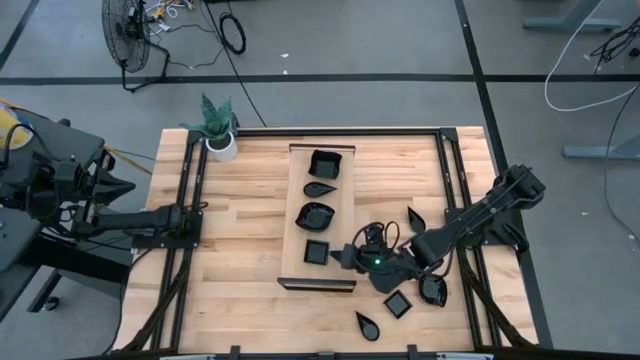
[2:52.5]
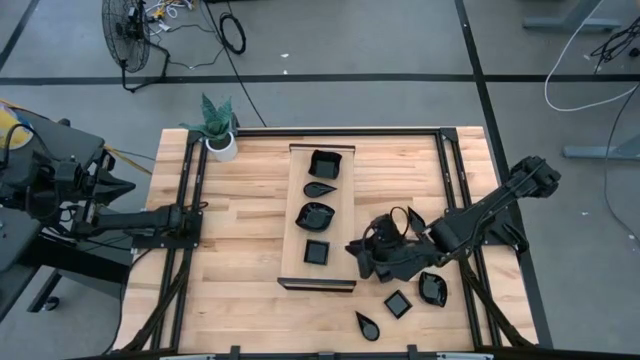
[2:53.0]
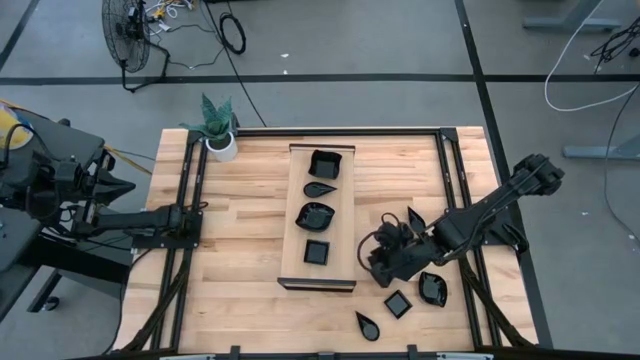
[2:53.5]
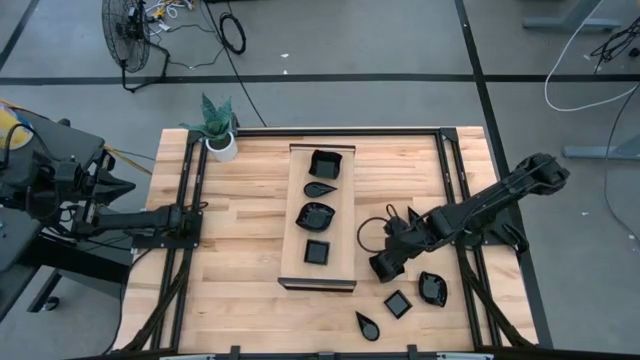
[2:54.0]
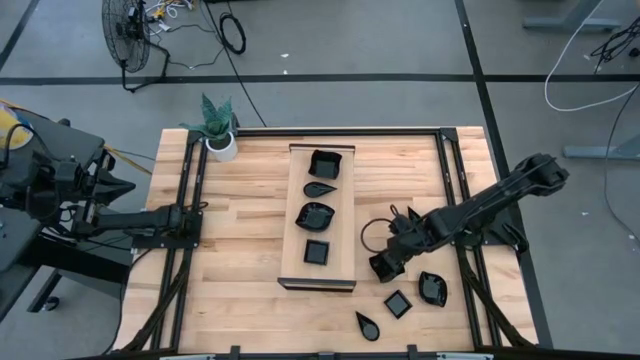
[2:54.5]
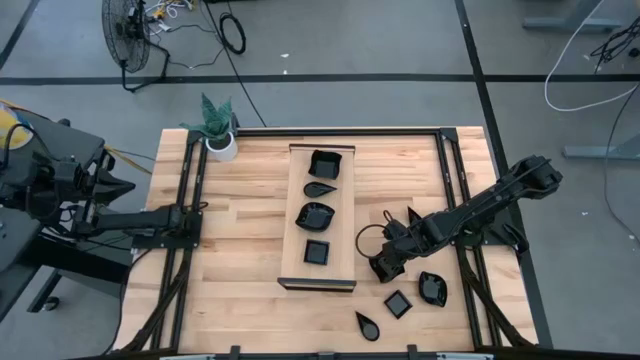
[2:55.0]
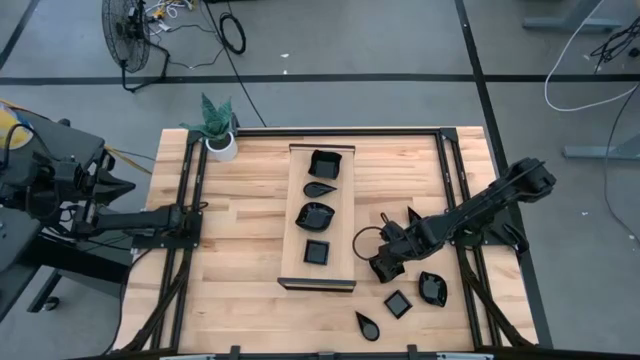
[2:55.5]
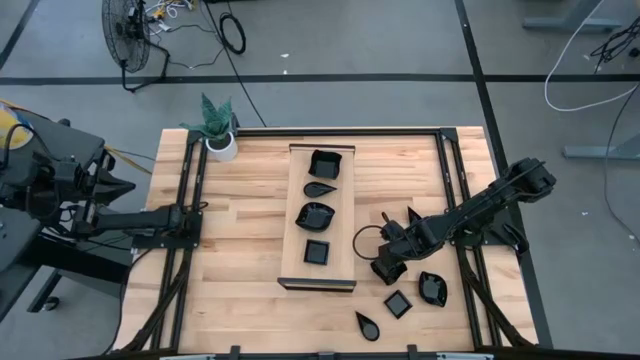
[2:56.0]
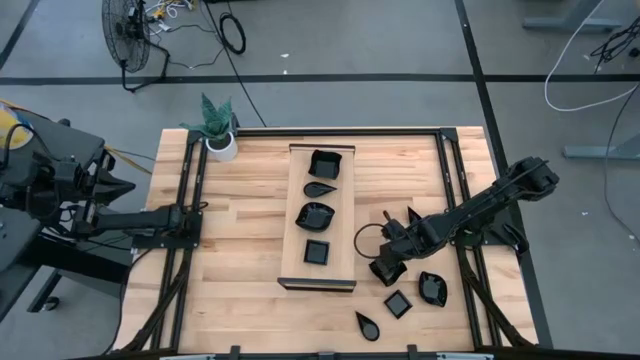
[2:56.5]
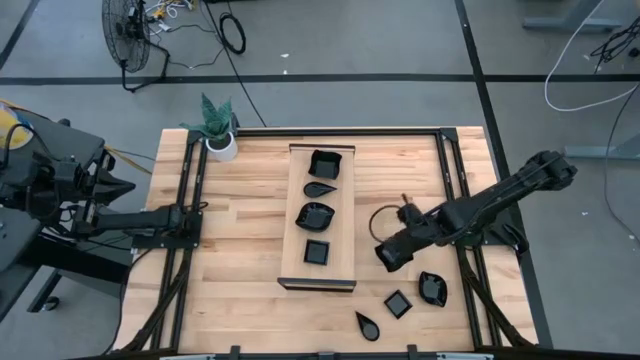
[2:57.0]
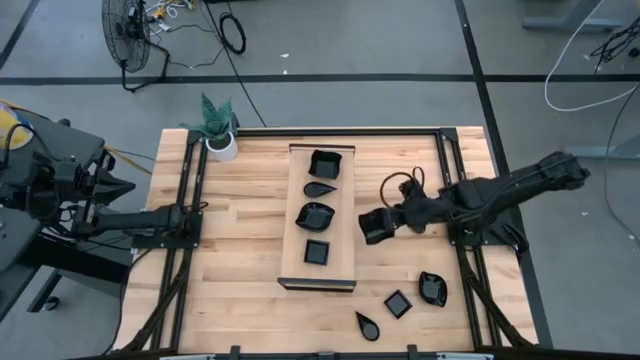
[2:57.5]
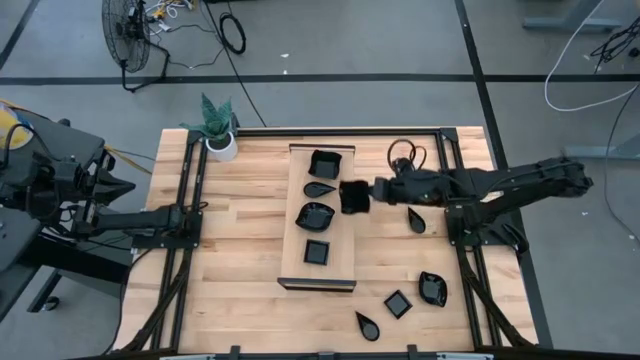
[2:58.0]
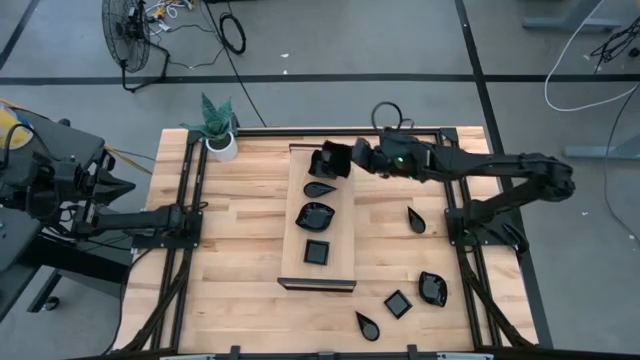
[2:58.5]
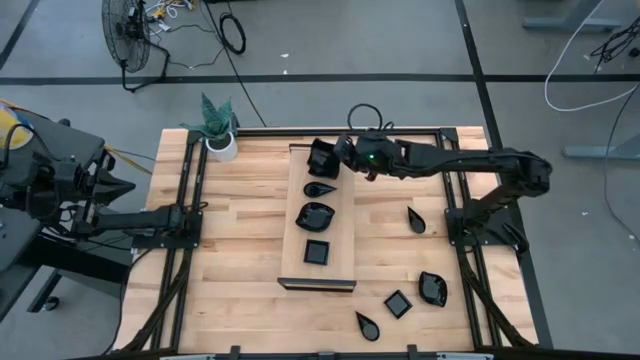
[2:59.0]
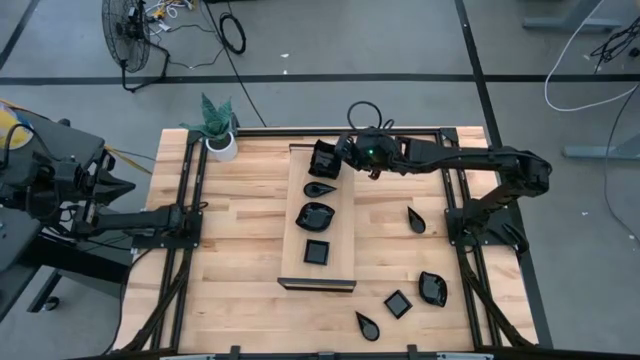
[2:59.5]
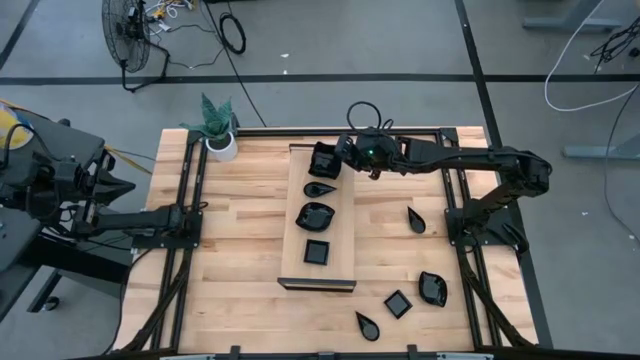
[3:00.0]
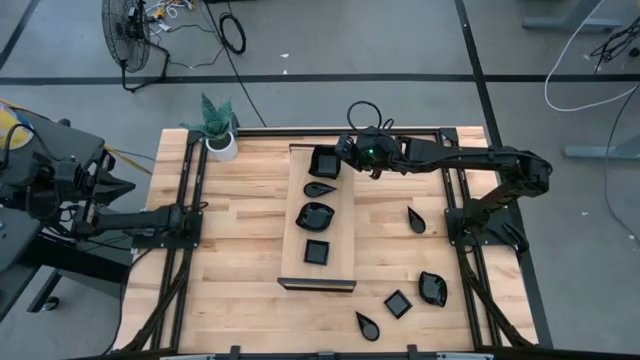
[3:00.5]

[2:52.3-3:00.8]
Task: Pick & Place Mini shaped plates
Stack the distorted square plate on top of the distorted square plate on the shelf

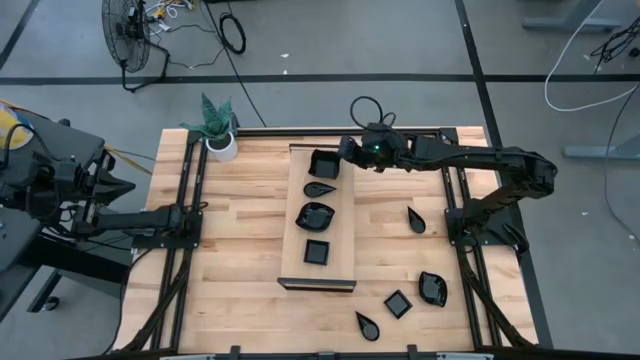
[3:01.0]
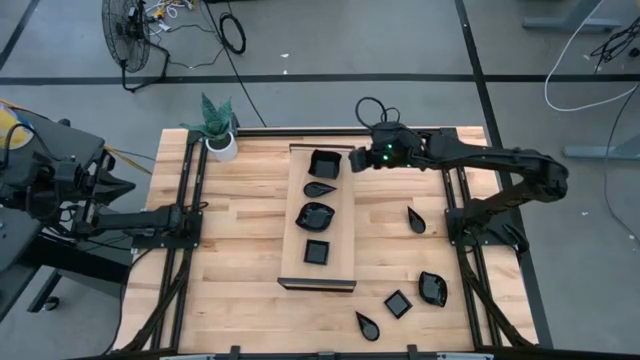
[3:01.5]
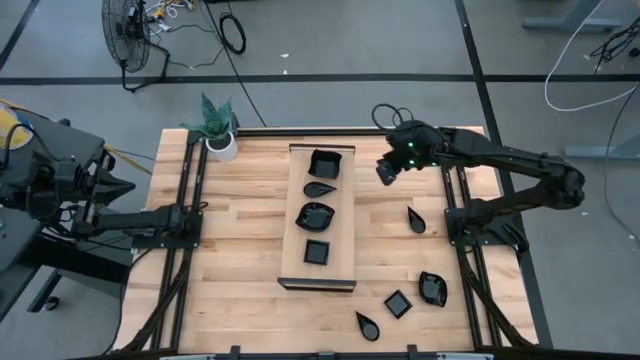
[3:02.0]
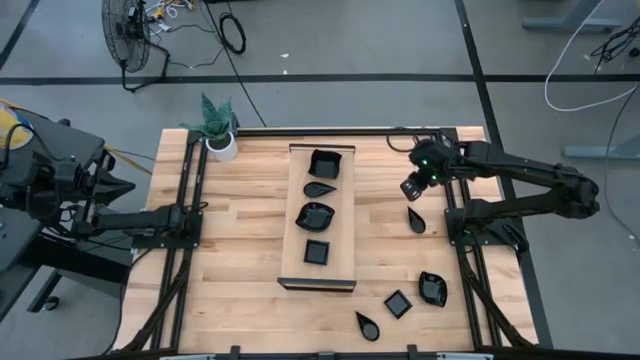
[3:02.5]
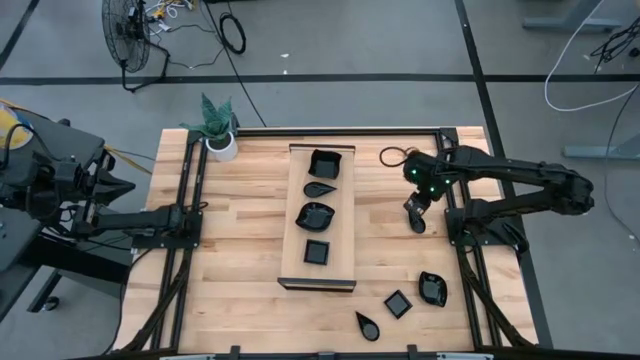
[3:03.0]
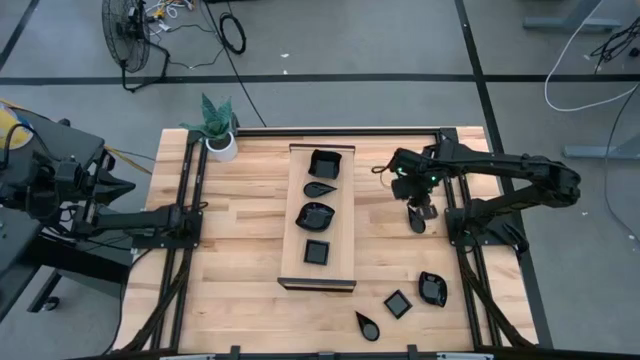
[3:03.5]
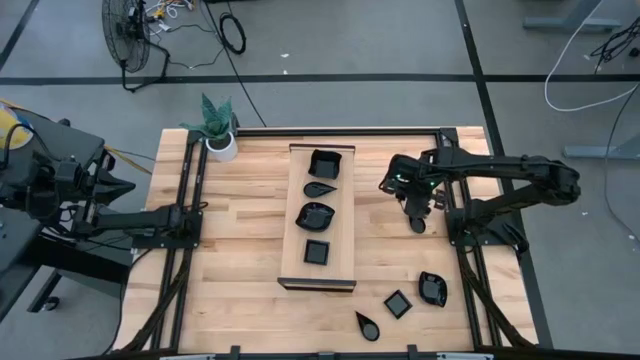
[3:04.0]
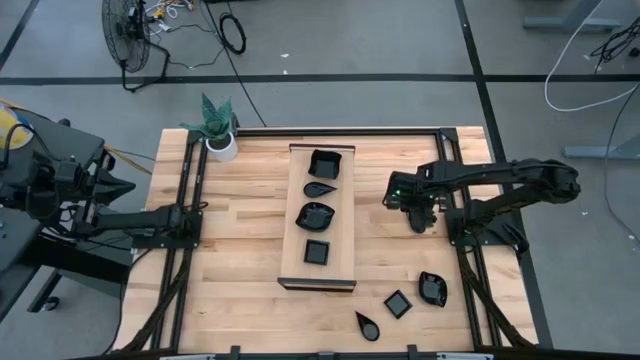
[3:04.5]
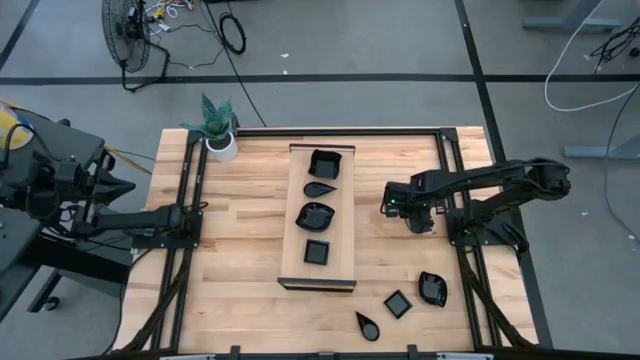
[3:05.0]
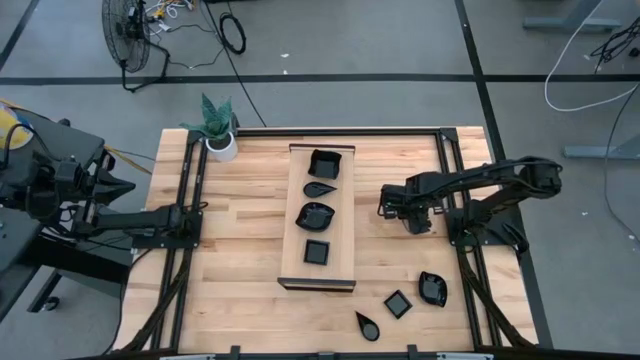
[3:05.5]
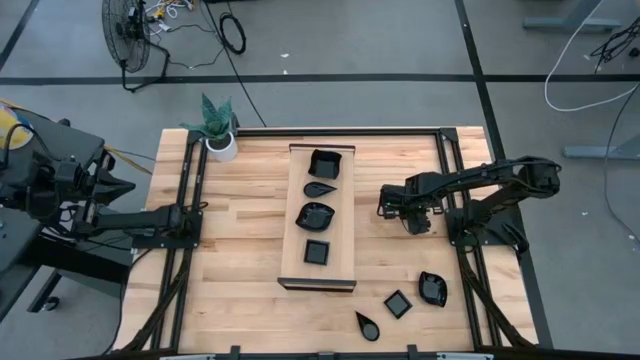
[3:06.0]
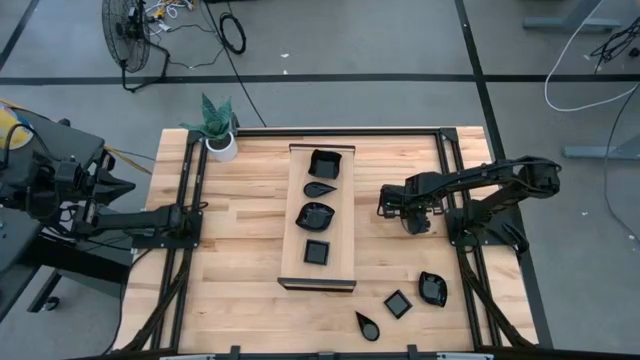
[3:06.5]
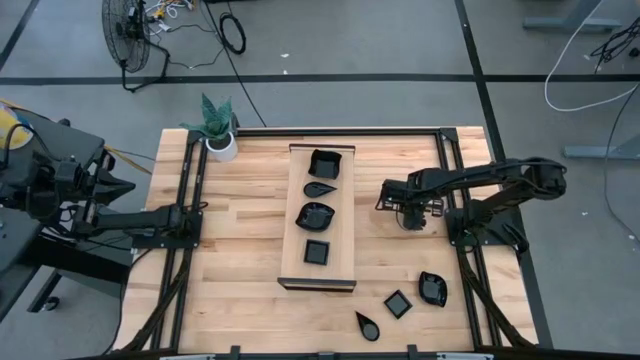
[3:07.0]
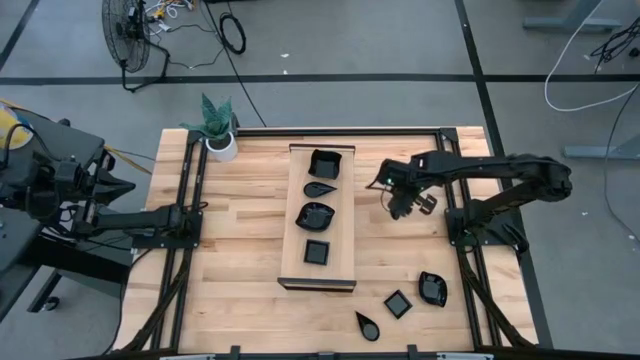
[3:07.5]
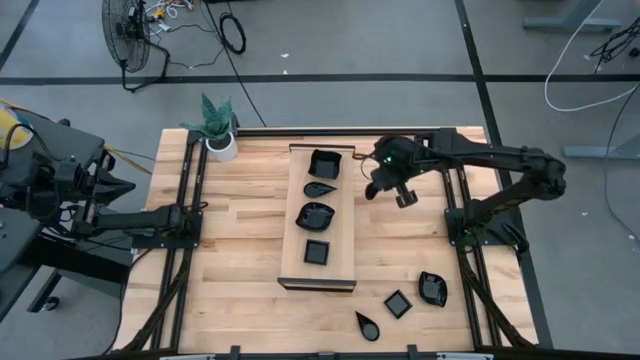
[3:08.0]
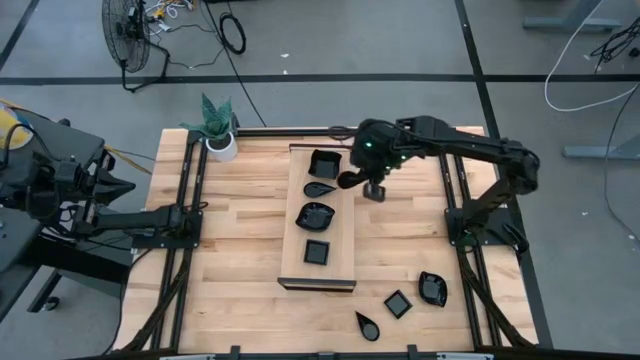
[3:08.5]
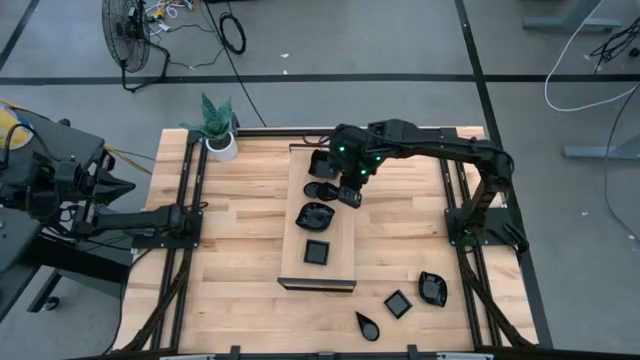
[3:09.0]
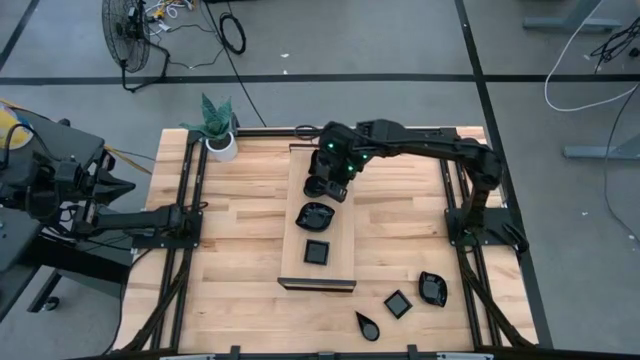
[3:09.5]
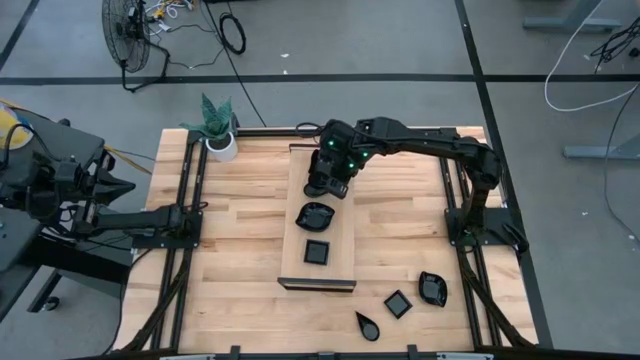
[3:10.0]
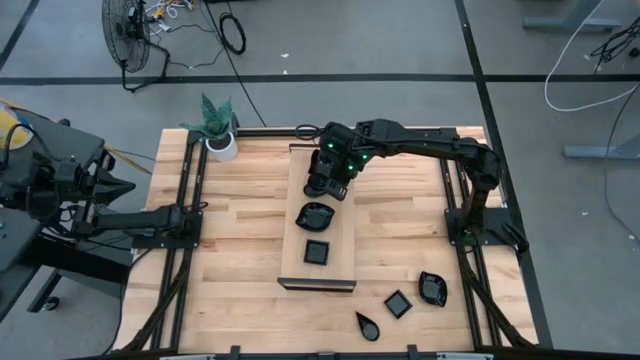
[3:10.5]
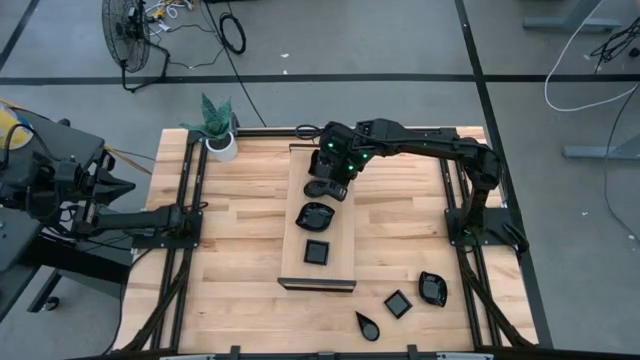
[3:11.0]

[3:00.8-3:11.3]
Stack the drop shaped plate on top of the drop shaped plate

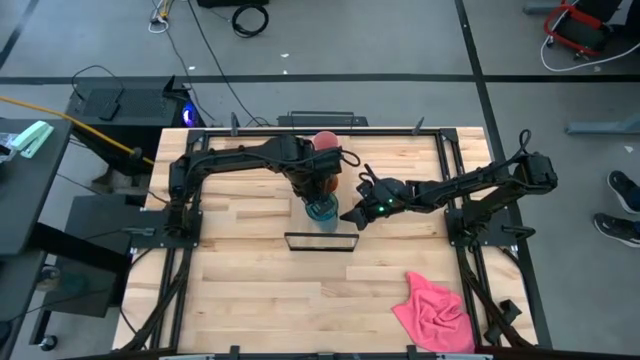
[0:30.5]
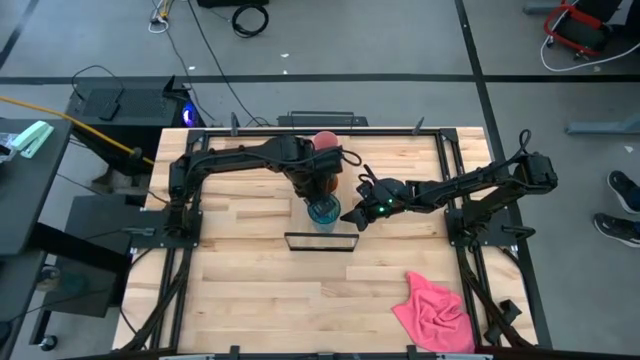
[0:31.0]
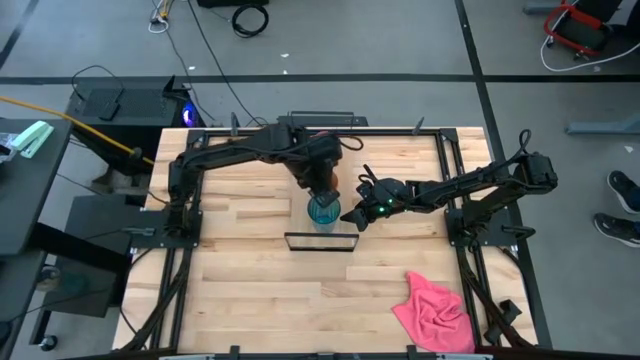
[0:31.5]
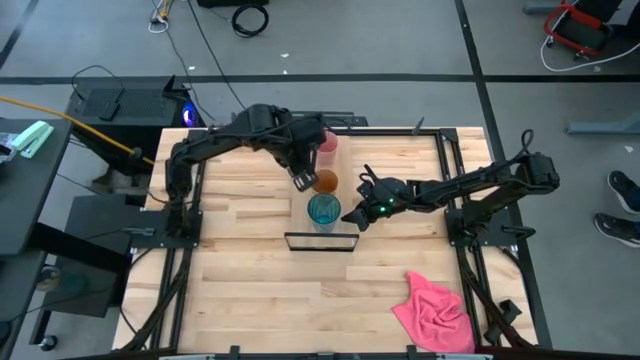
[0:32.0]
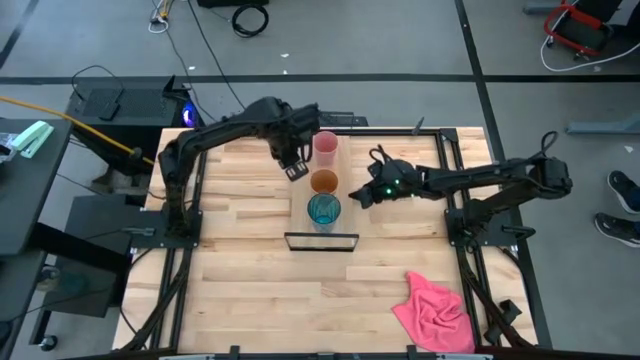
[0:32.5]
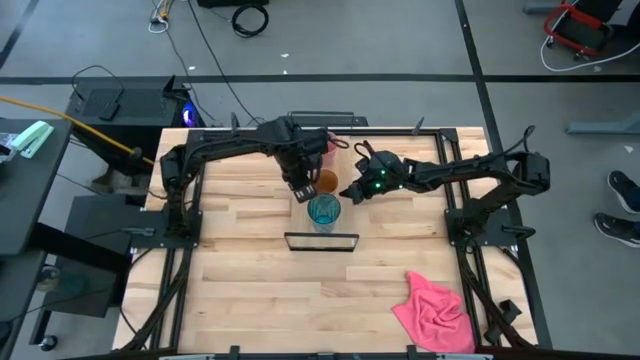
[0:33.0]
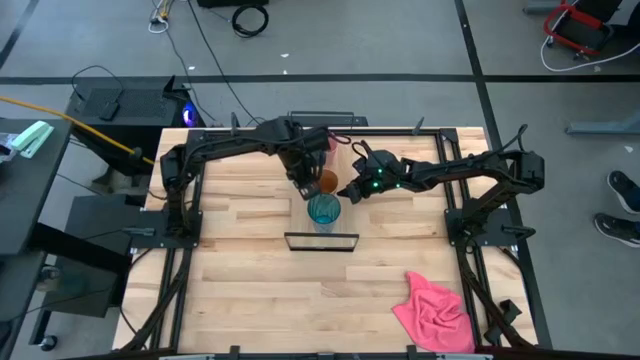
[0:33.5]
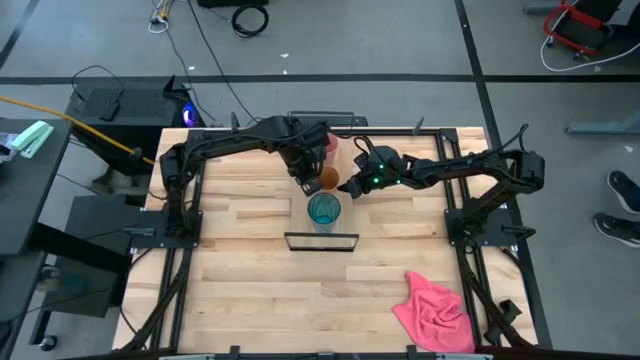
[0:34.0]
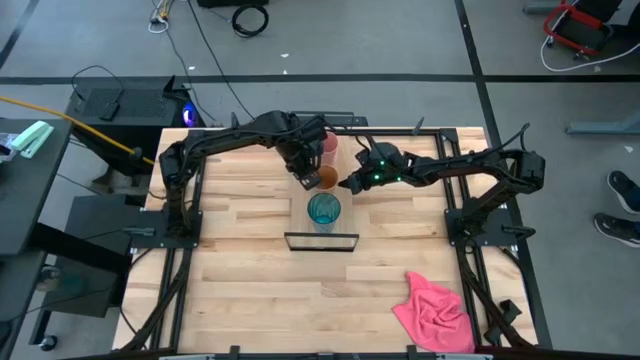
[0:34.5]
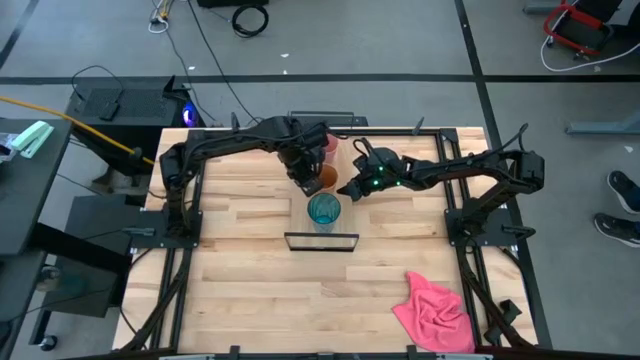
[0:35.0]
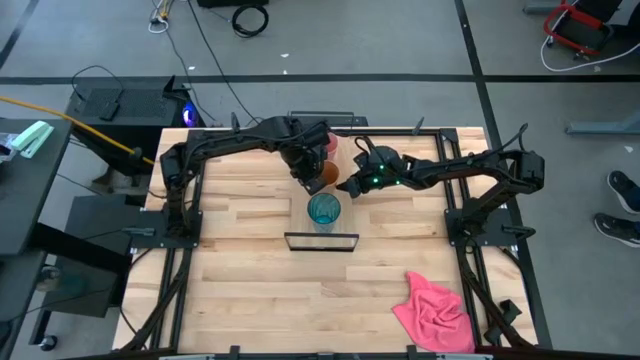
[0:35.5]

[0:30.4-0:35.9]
Task: Stack small to large cups/mugs on shelf
Adjust the cups and glass on the shelf
